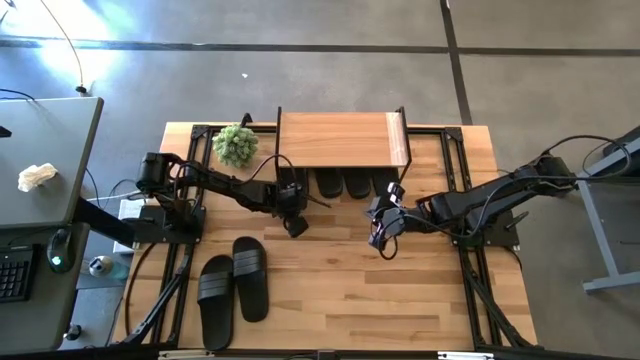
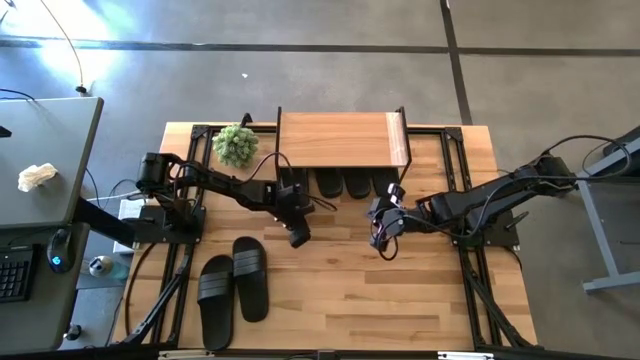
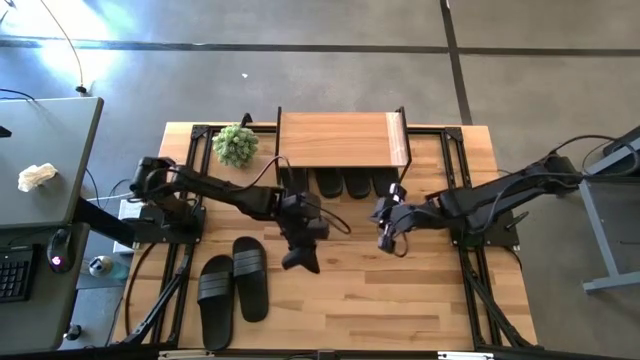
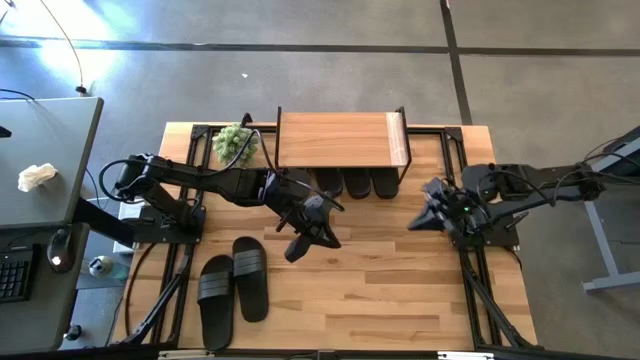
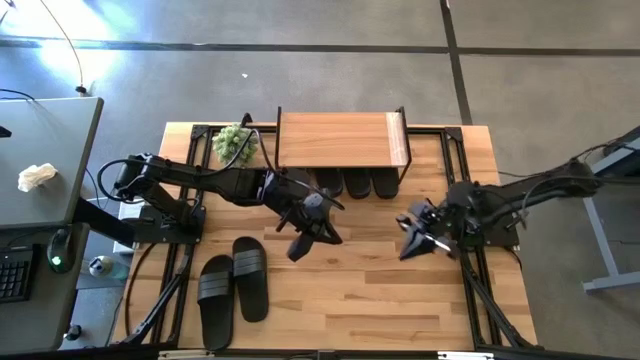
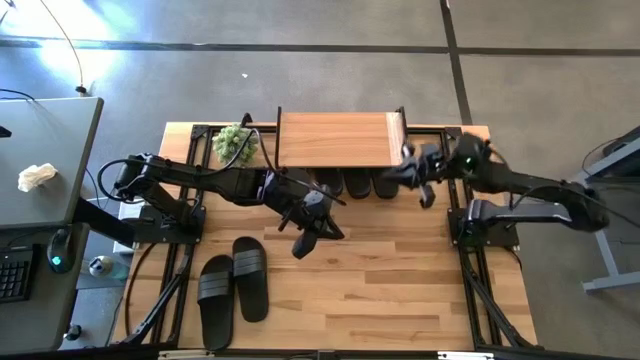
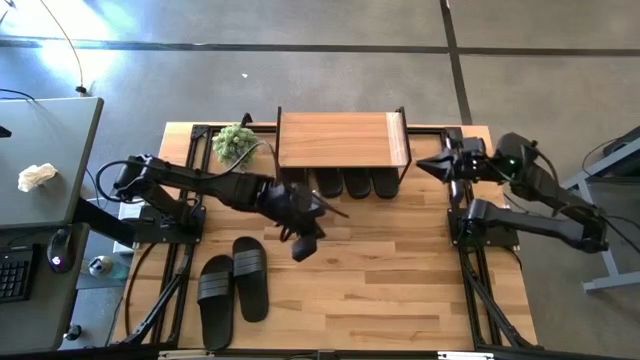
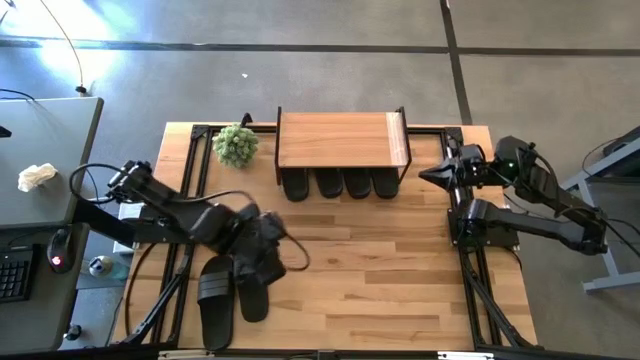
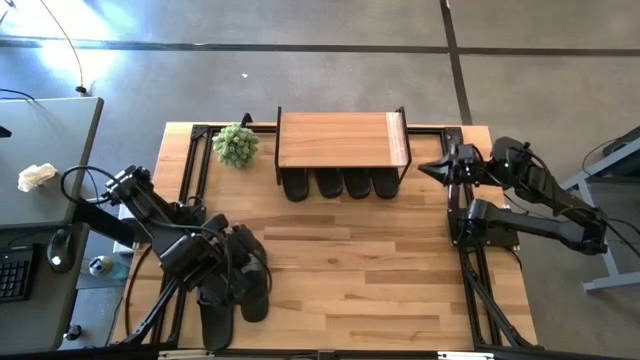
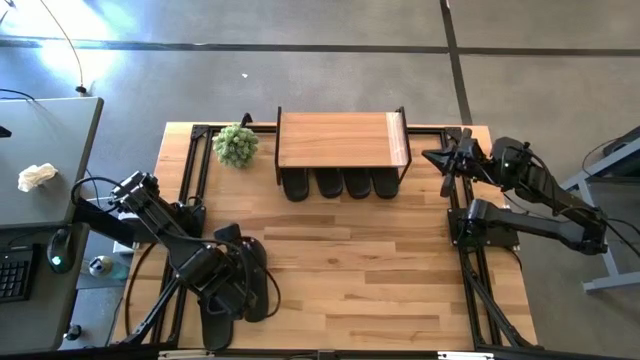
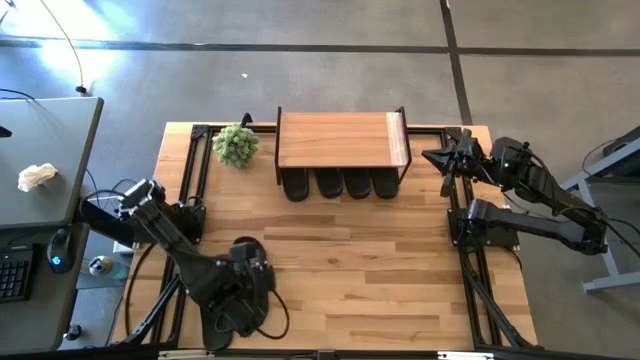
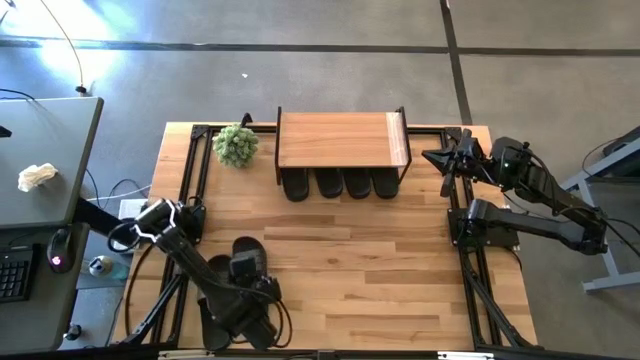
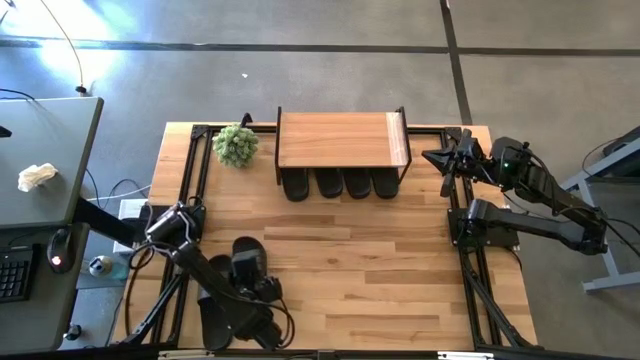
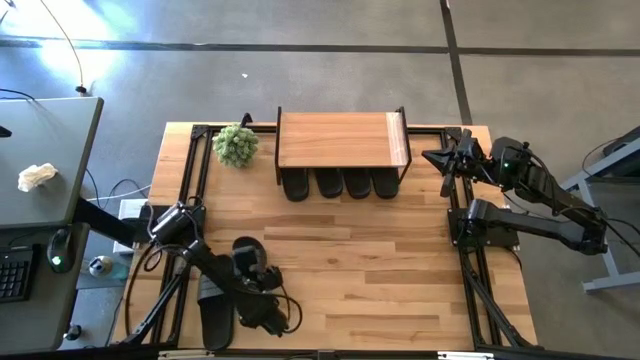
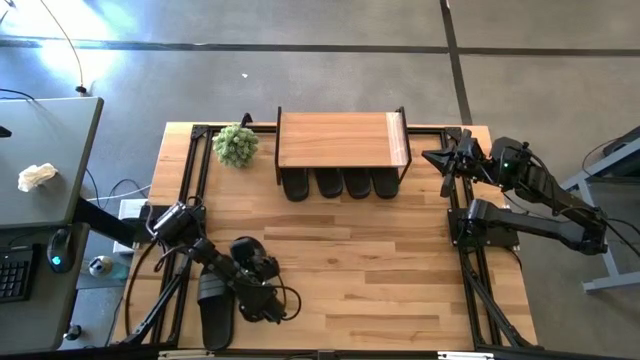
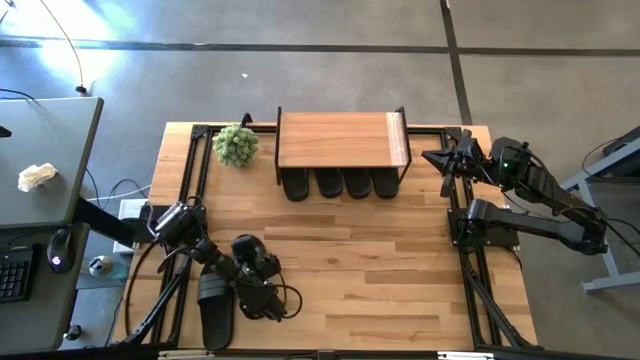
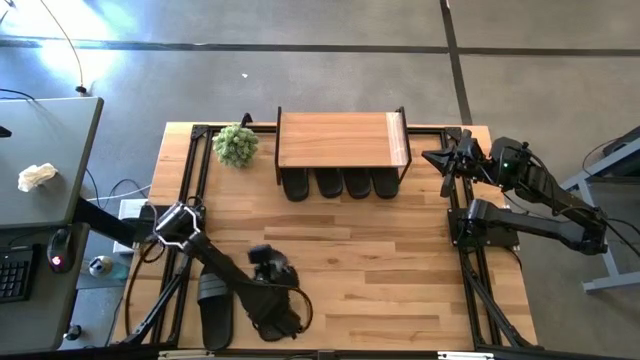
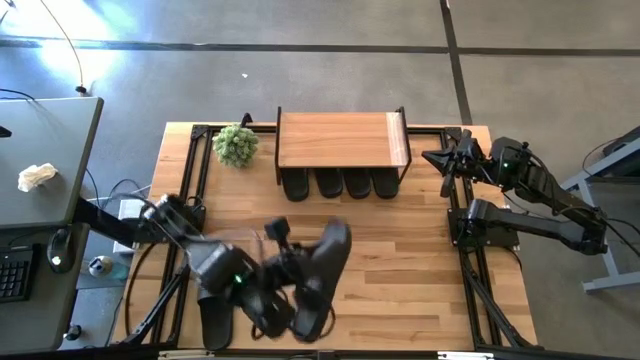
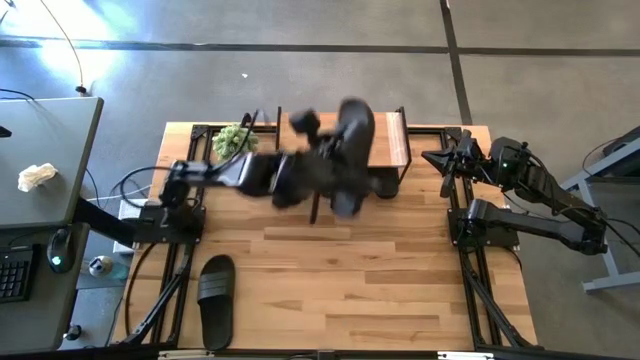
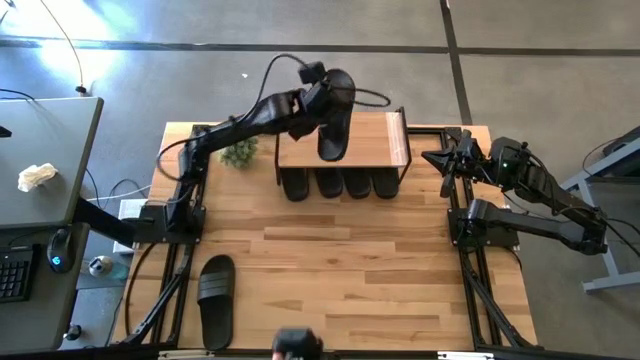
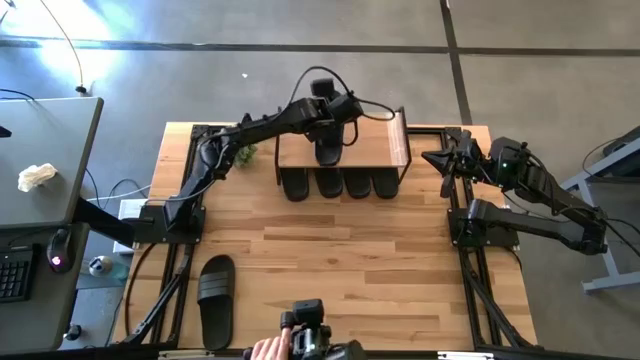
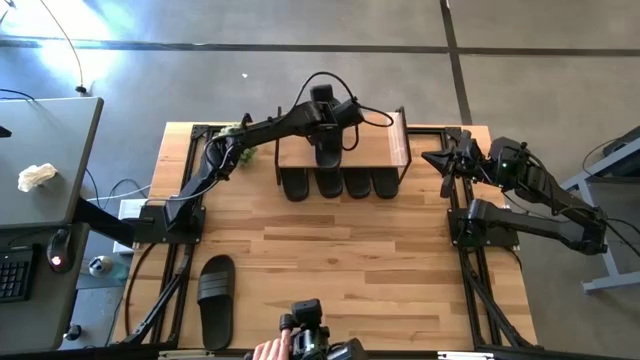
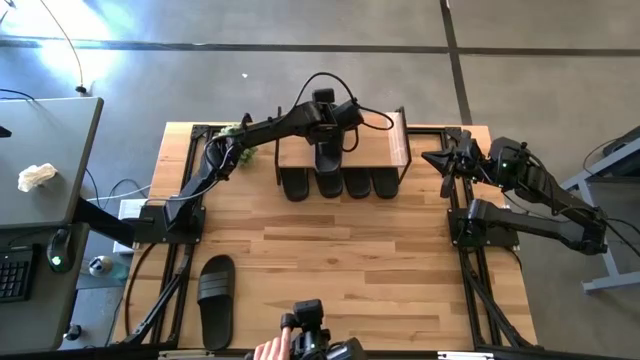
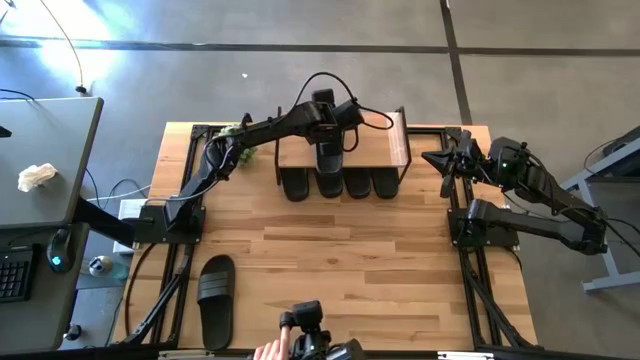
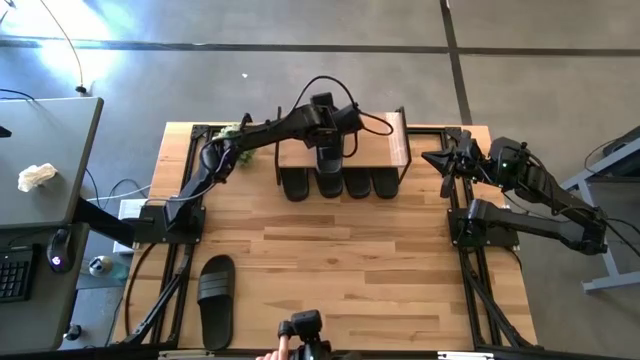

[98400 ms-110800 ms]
Task: Pick and place slides into the shelf
Put the black slipper on the shelf

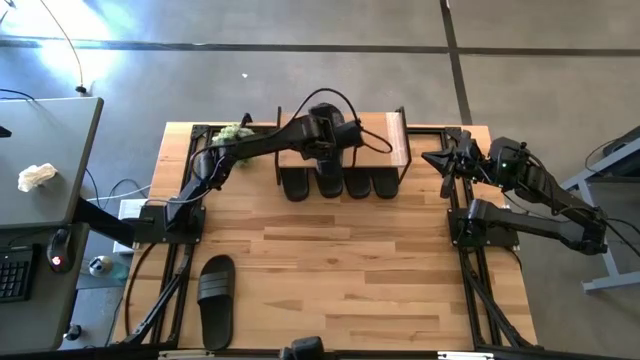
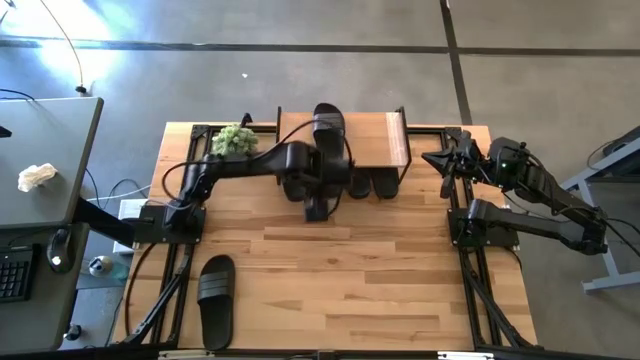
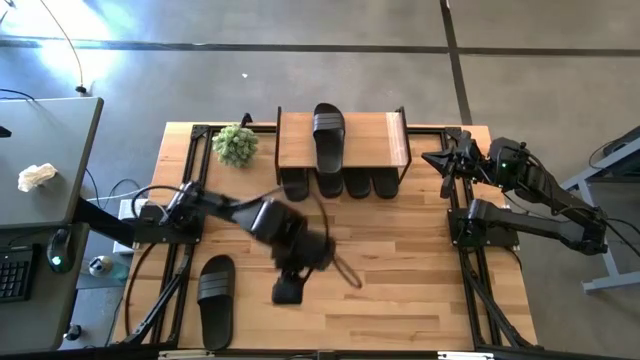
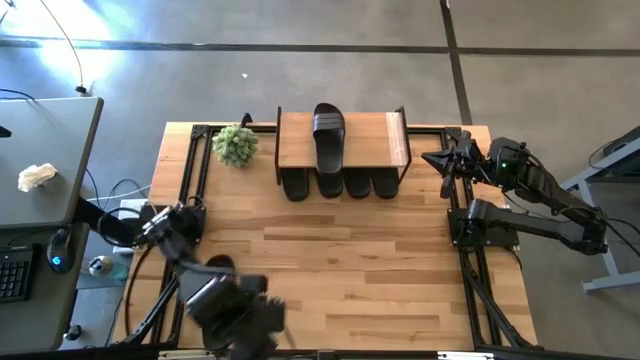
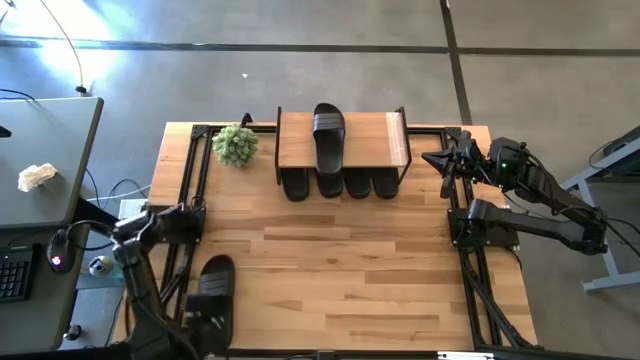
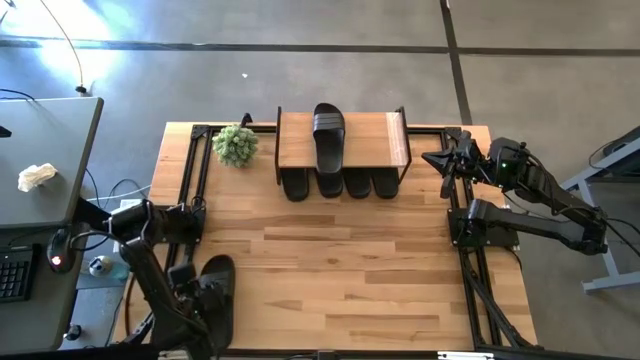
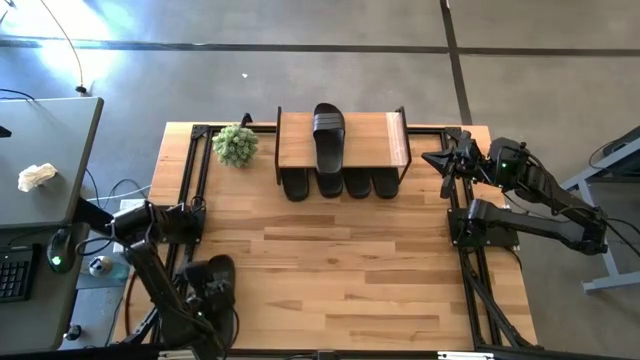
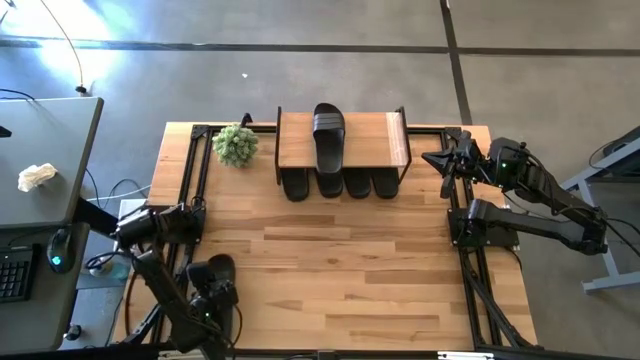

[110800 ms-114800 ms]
Put the black slipper on the shelf

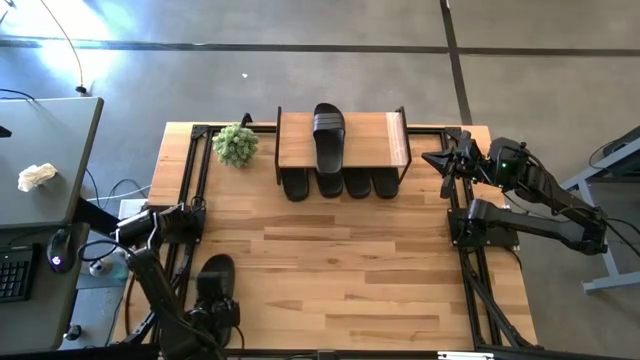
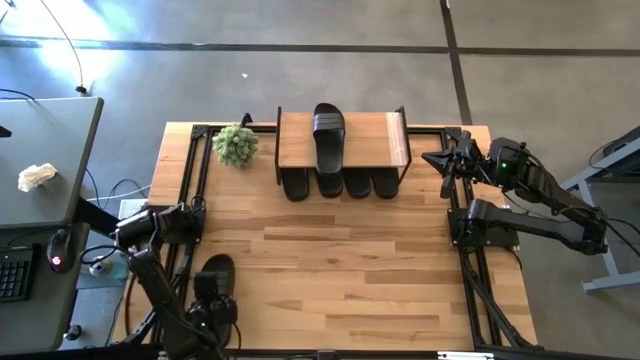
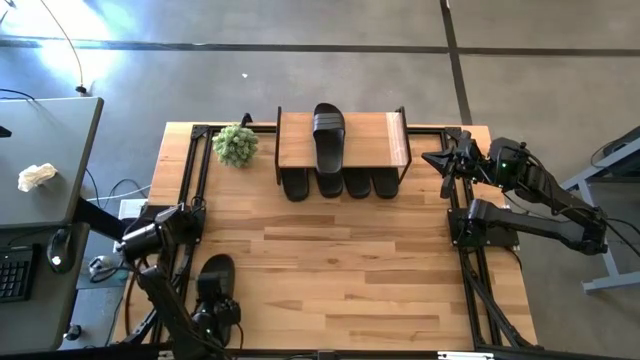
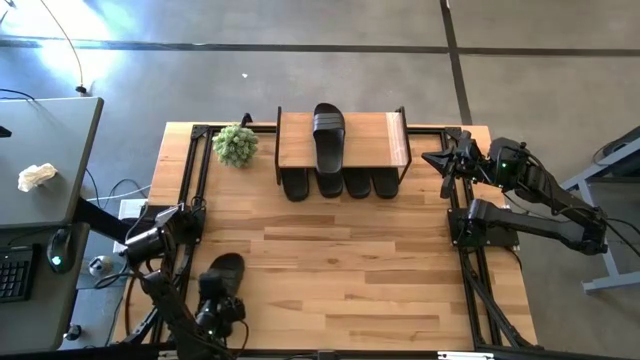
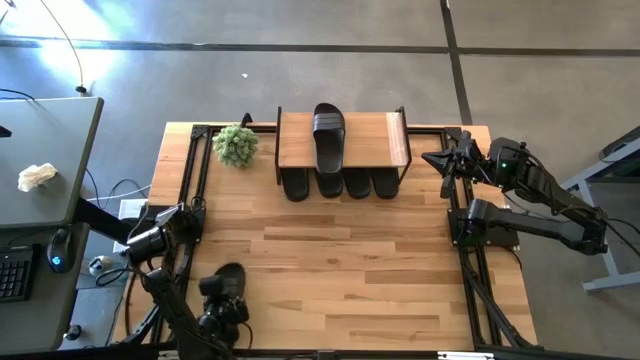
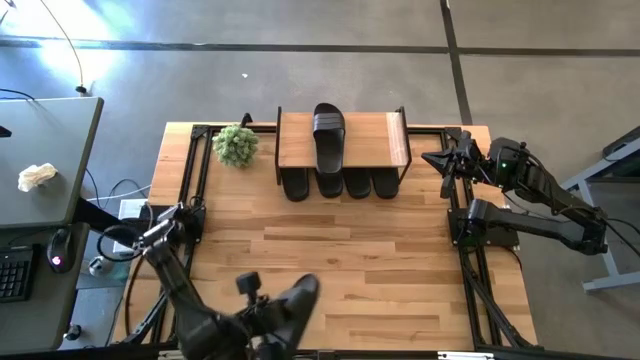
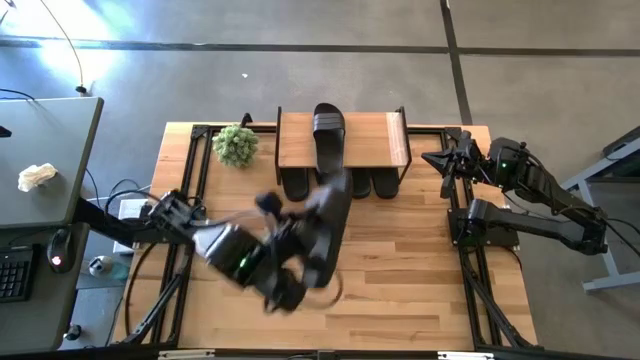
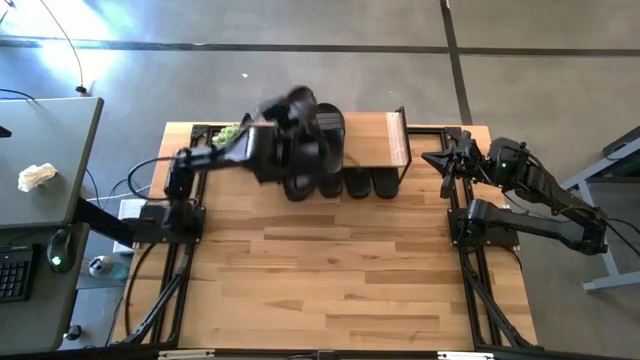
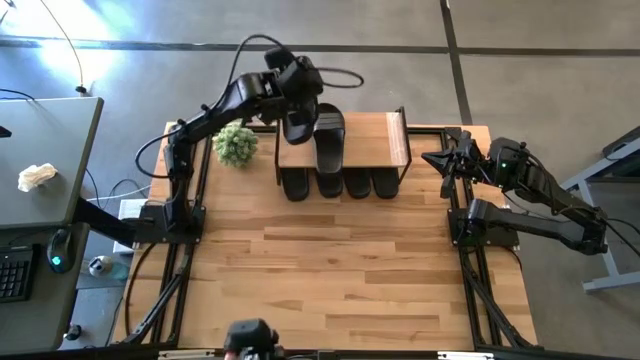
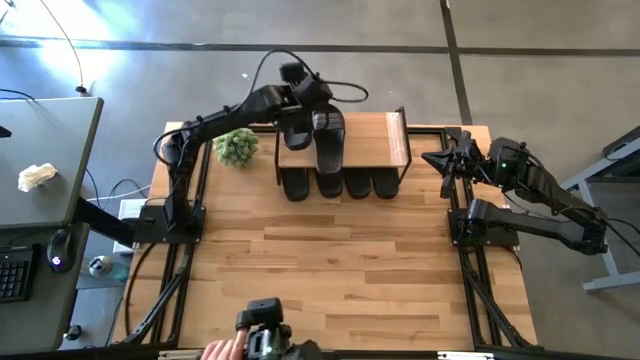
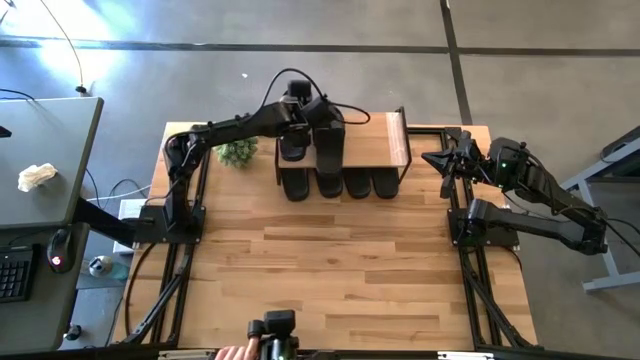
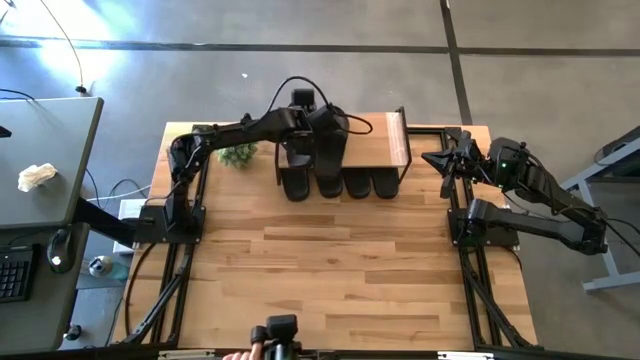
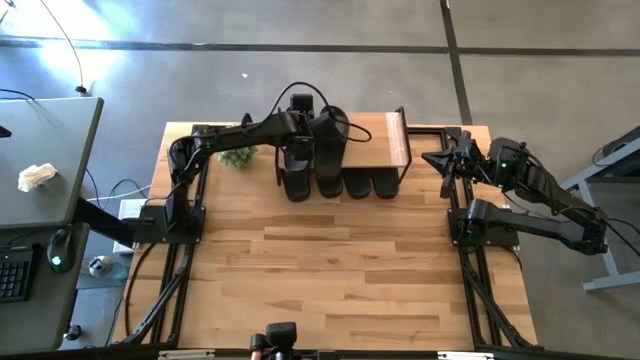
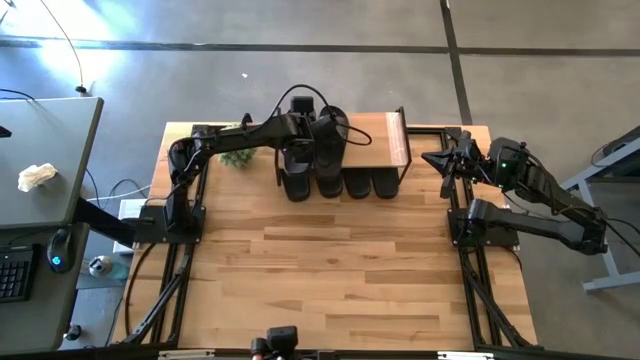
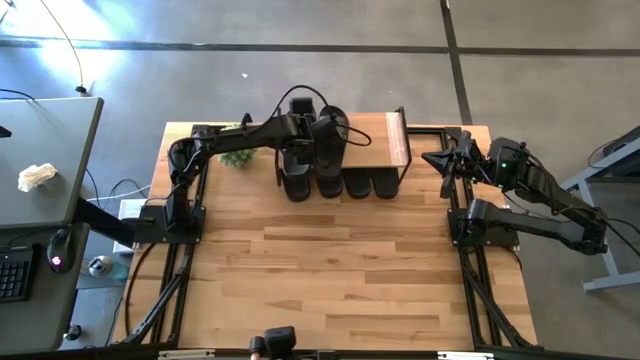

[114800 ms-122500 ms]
Put the black slipper on the shelf
